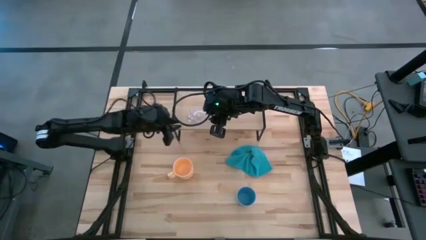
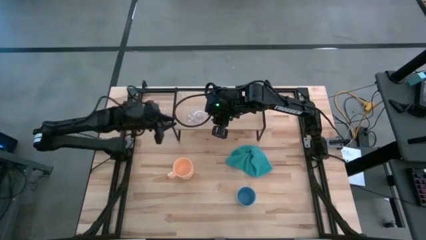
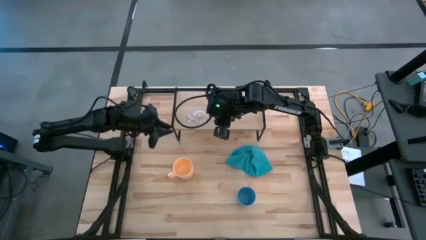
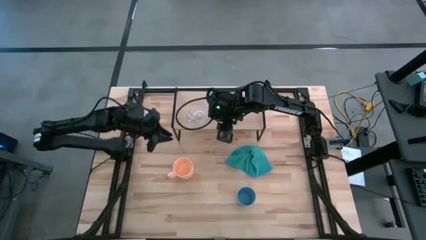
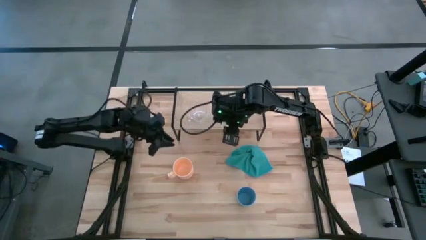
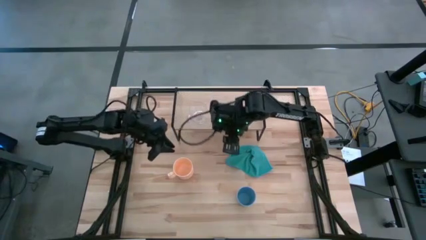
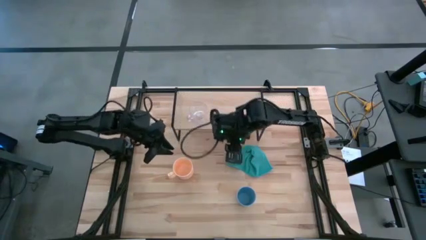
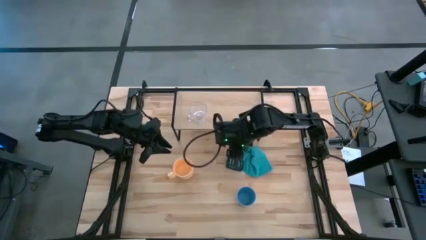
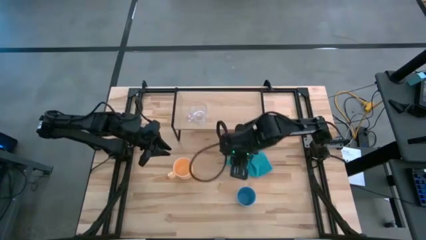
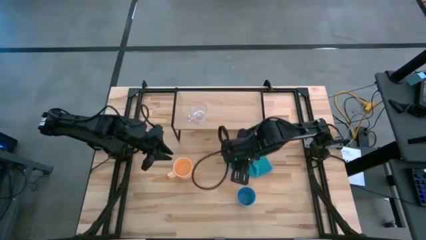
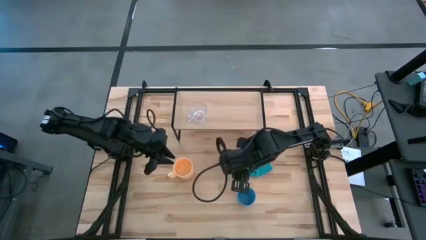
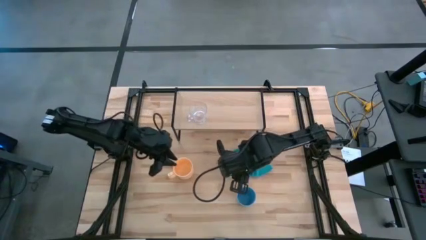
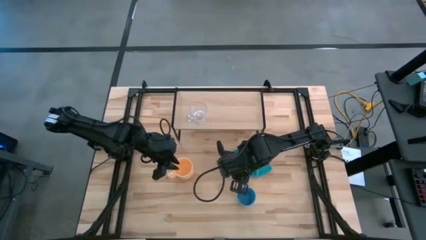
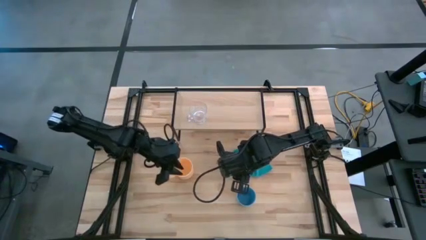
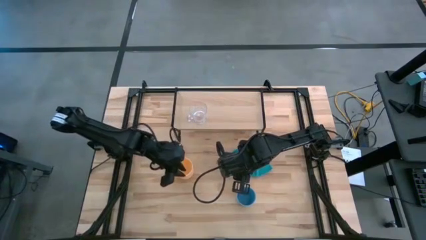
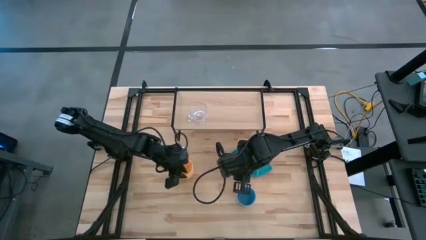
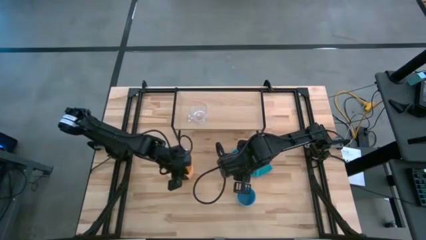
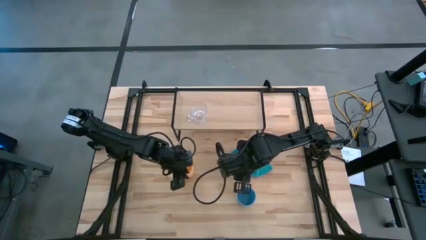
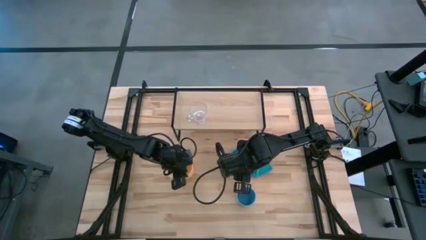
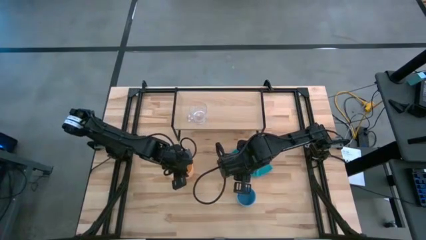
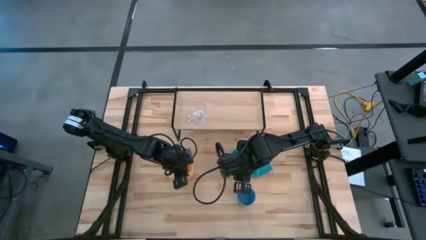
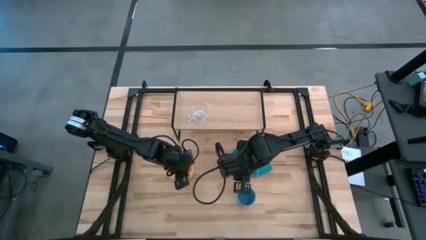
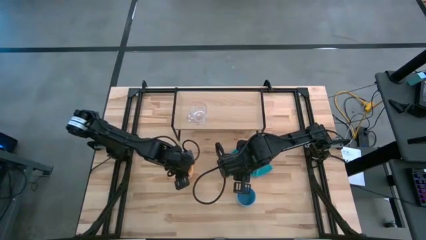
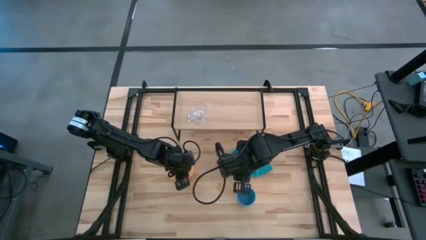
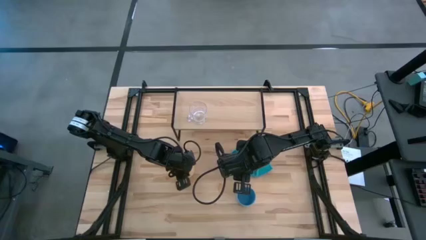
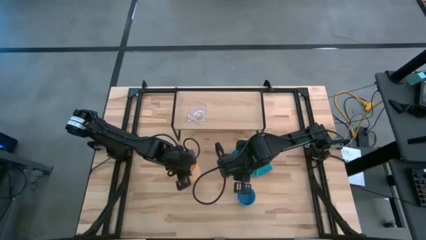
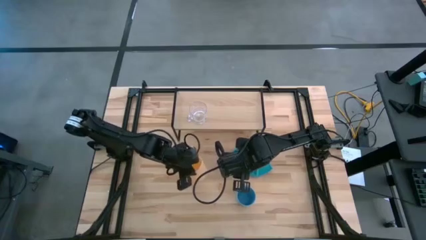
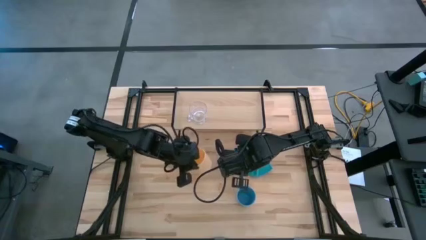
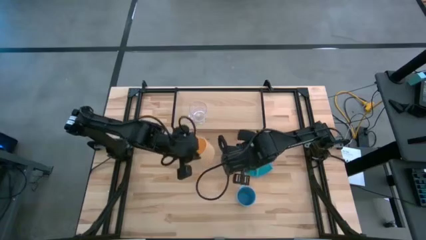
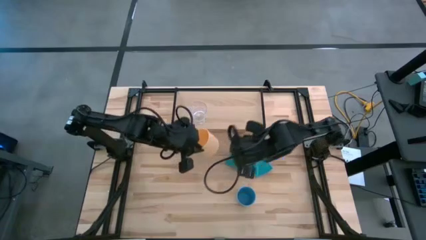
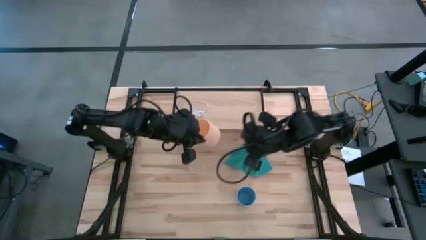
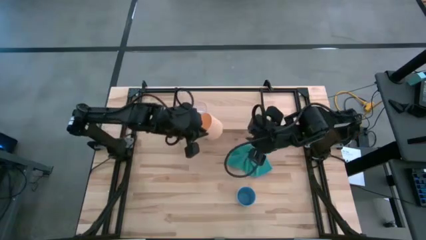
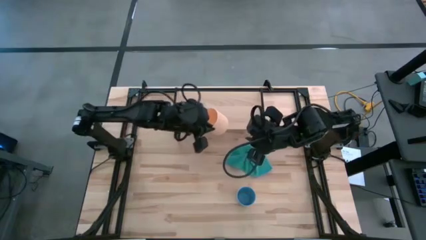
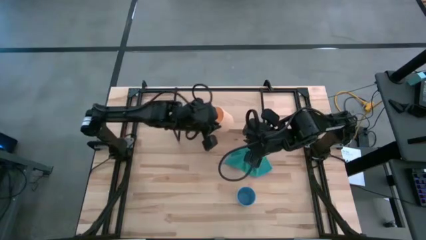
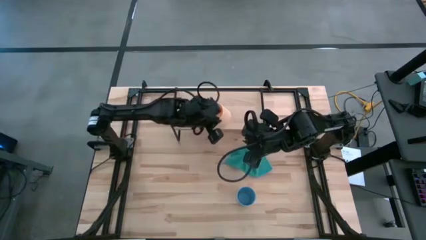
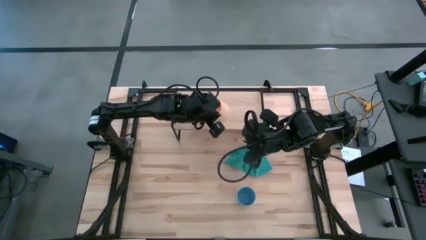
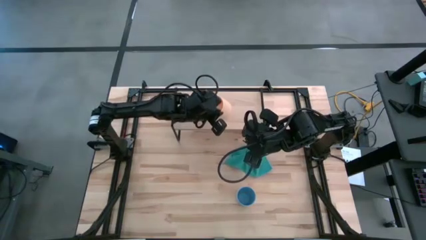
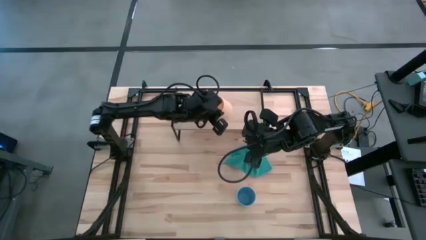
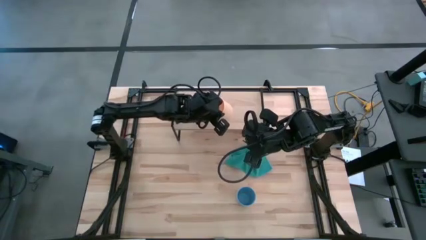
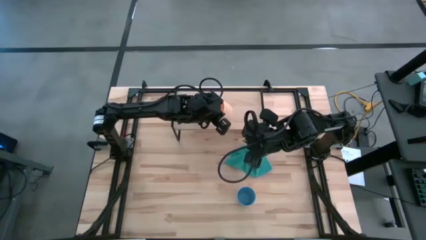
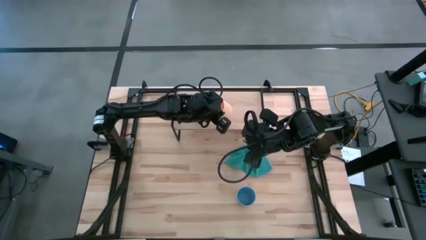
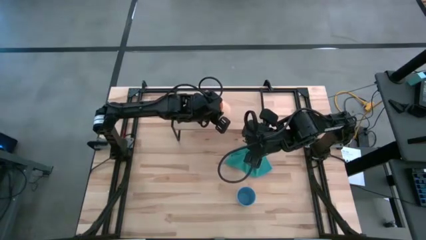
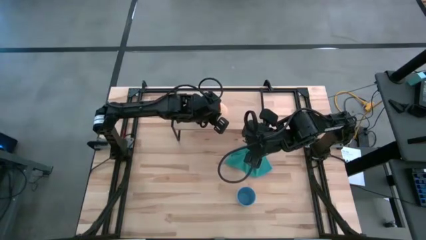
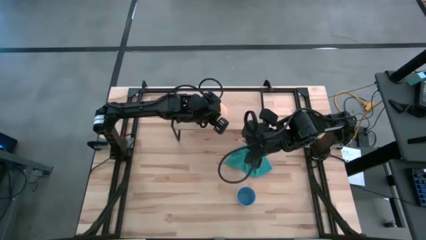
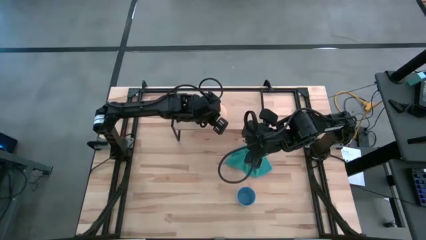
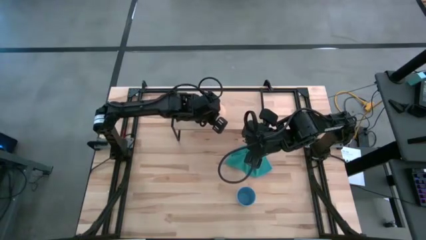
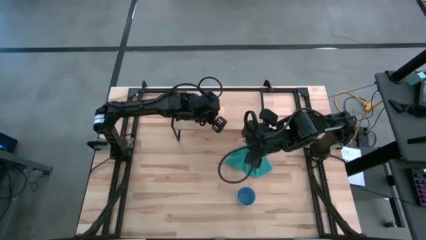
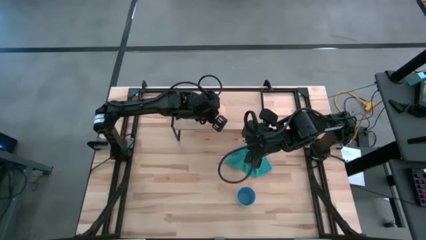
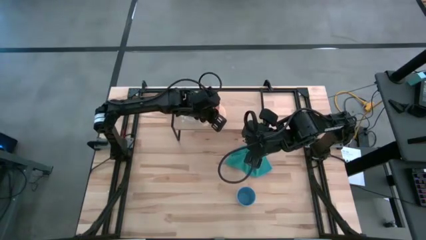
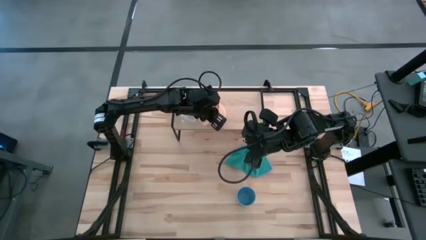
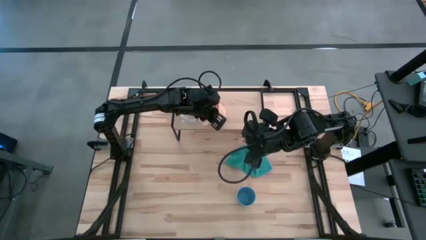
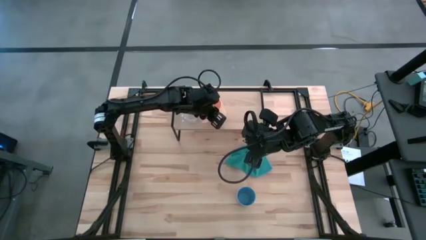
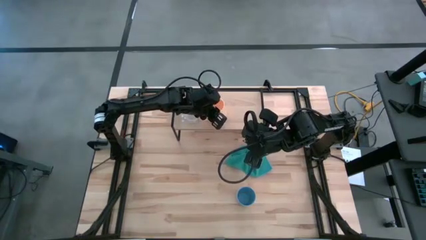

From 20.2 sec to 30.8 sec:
Task: Stack small to large cups/mugs on shelf
Put the orange mug on the shelf
